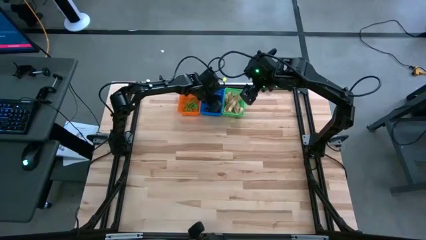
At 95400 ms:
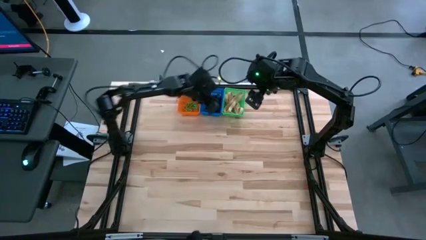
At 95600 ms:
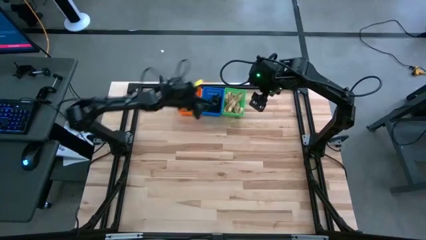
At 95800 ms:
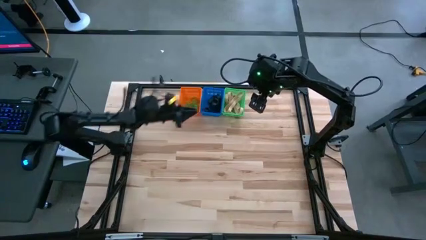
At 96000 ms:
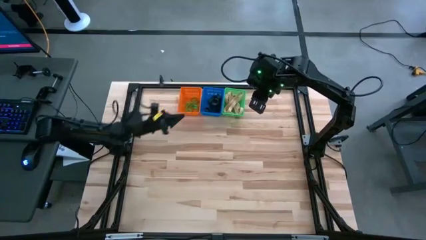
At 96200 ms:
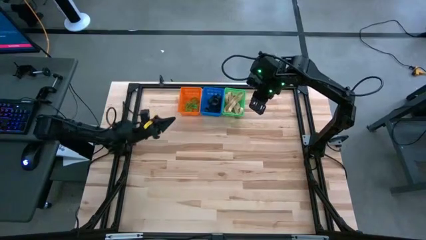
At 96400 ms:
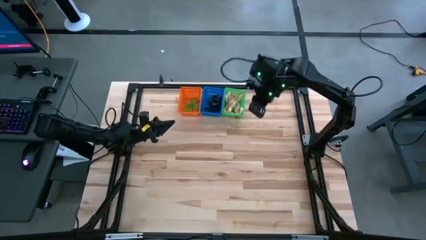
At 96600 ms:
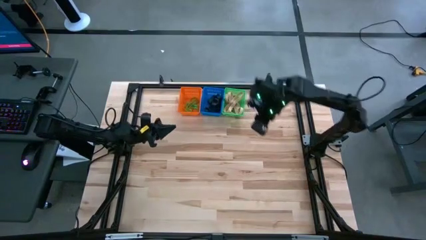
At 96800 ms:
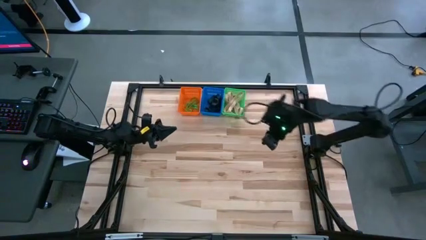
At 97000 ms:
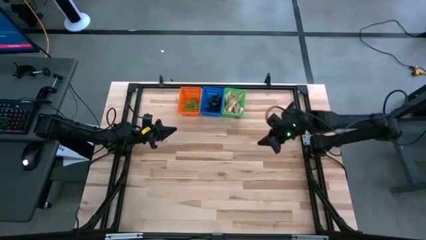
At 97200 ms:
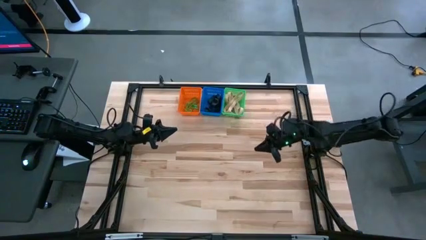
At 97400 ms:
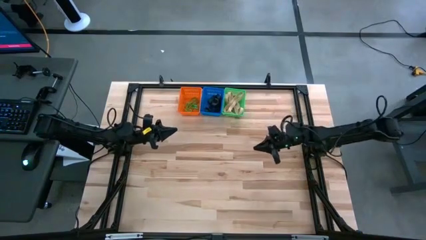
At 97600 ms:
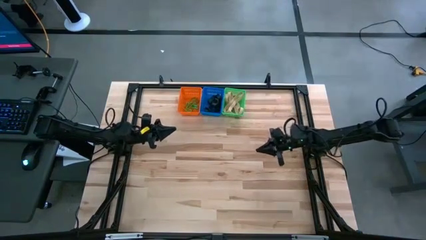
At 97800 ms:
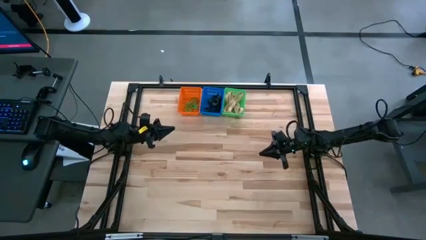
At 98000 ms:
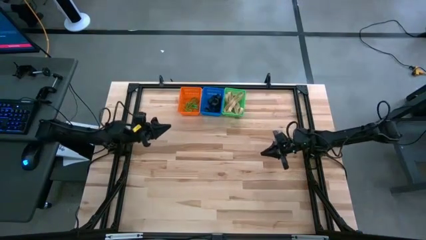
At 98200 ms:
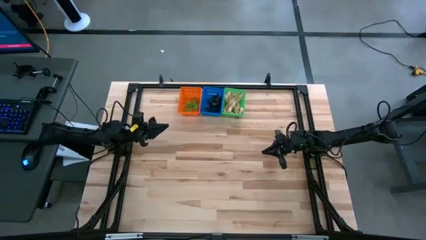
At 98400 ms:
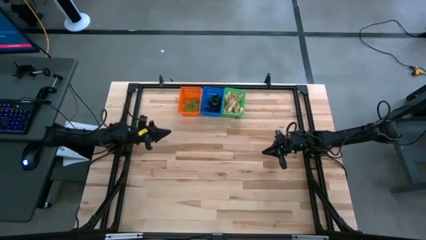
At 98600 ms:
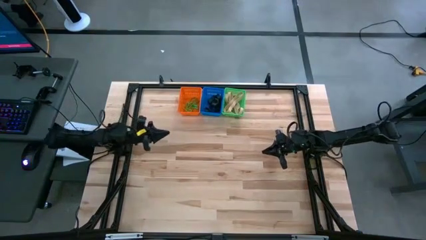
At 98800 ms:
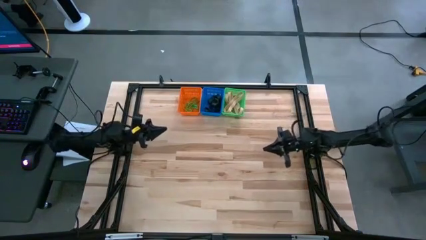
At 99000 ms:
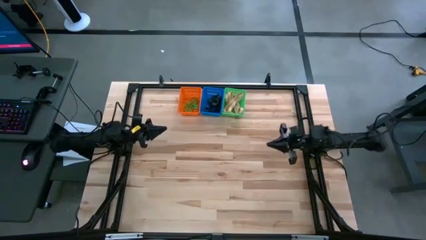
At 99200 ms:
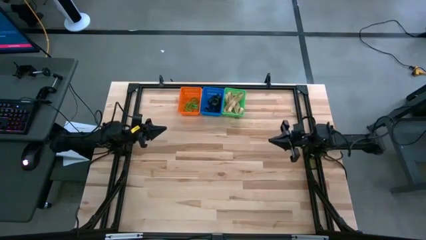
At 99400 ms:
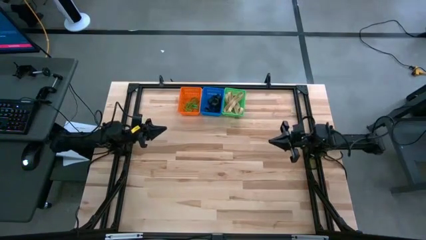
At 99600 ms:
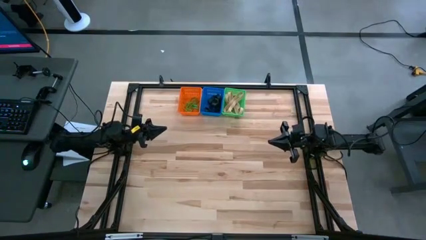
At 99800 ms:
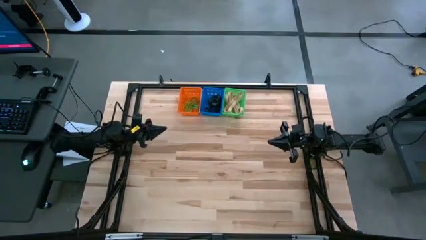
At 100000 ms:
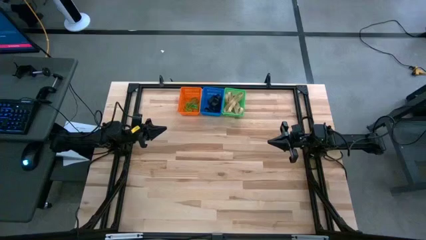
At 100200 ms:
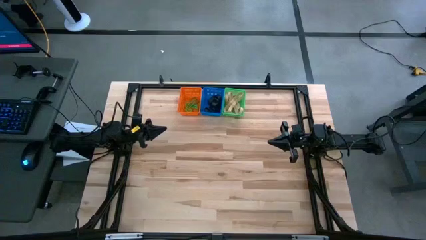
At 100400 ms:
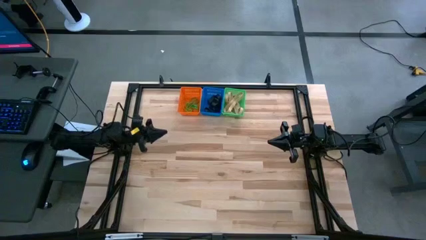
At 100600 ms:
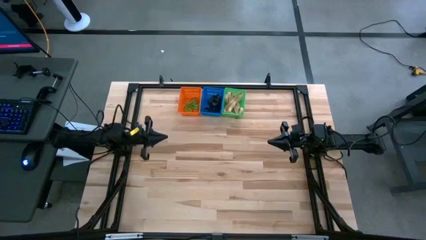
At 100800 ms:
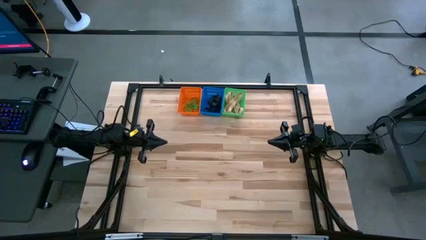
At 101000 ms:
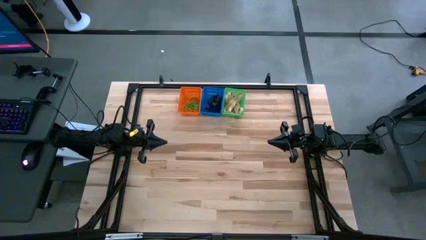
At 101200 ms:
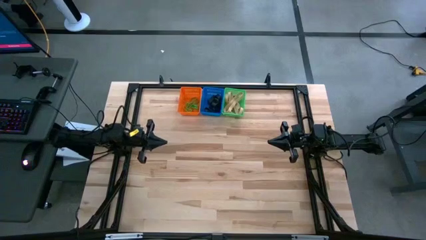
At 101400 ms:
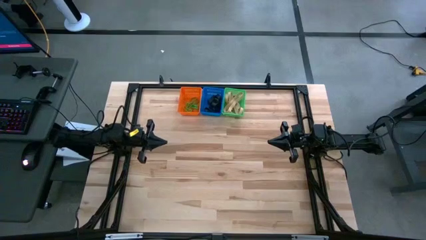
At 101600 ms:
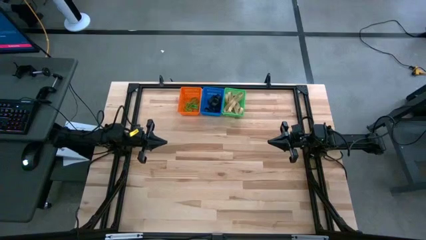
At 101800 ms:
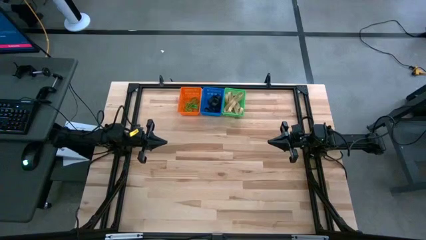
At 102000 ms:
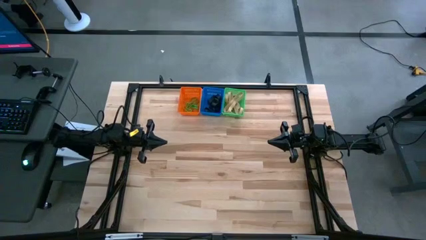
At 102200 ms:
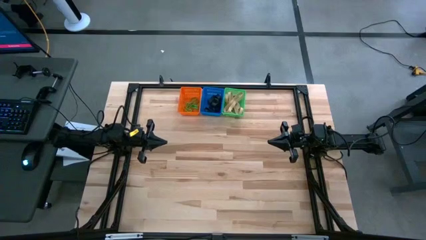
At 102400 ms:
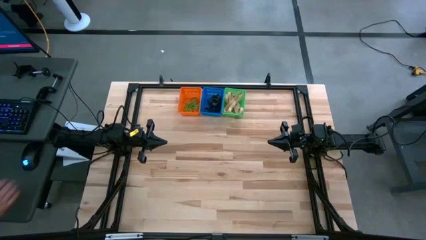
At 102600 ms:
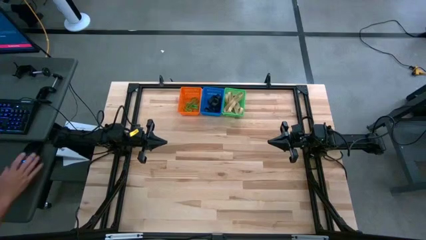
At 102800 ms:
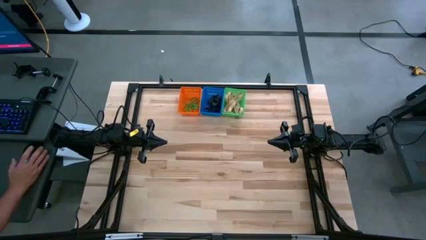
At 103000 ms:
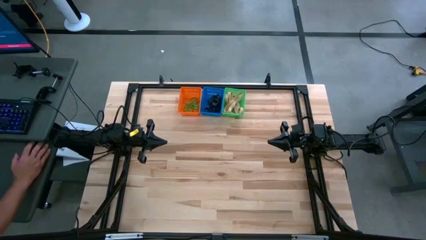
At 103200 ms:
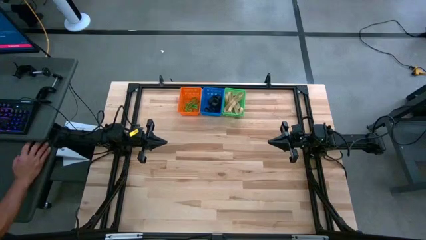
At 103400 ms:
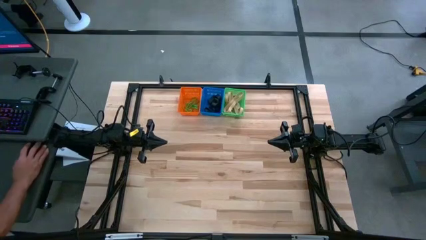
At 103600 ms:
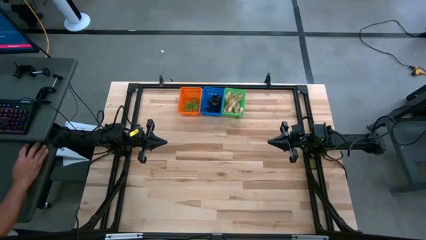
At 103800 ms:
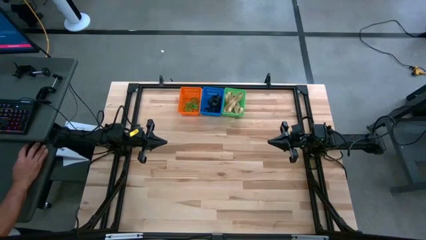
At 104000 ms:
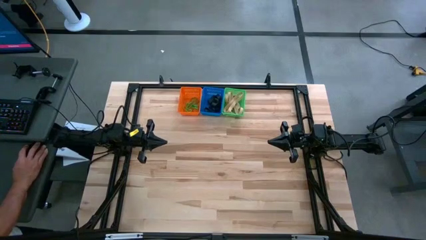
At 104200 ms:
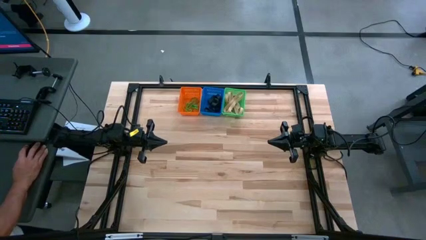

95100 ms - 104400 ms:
Task: Sort rubber bands into baskets
Return to Home Position

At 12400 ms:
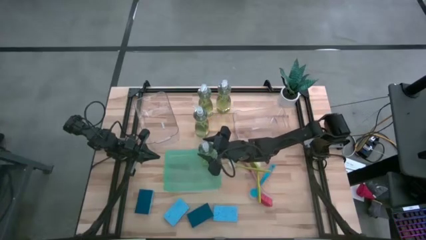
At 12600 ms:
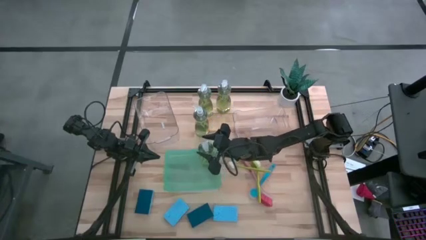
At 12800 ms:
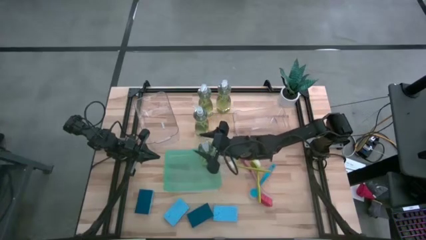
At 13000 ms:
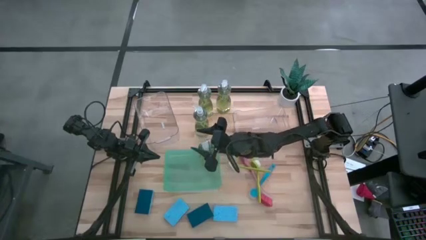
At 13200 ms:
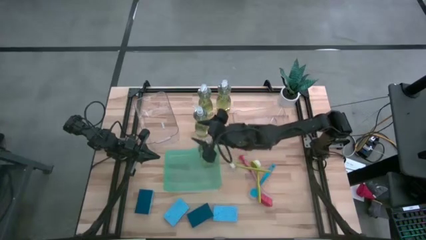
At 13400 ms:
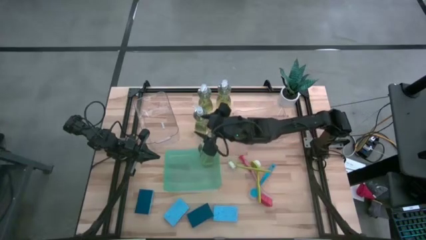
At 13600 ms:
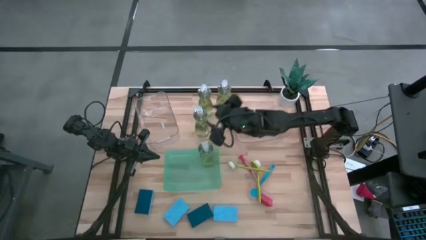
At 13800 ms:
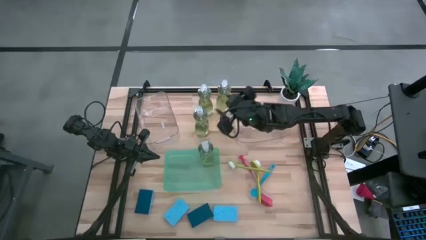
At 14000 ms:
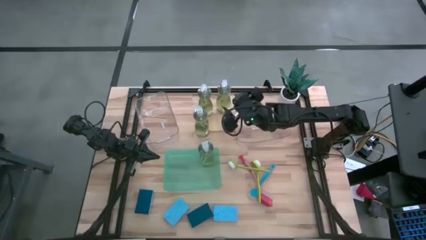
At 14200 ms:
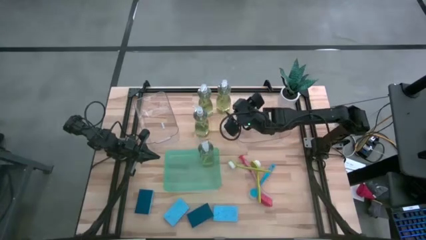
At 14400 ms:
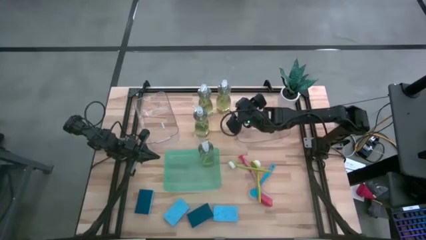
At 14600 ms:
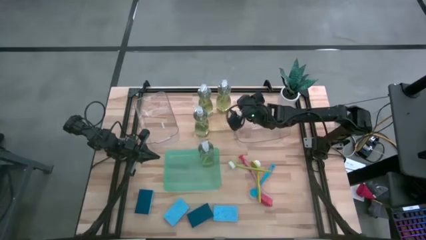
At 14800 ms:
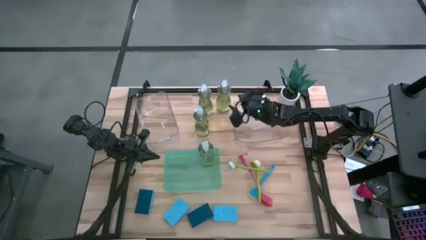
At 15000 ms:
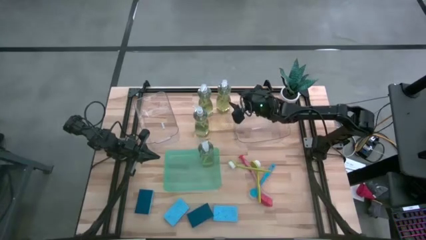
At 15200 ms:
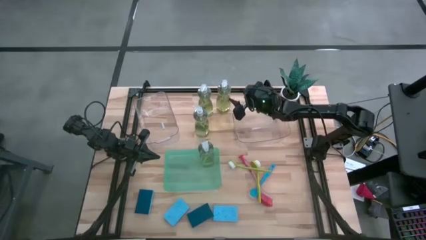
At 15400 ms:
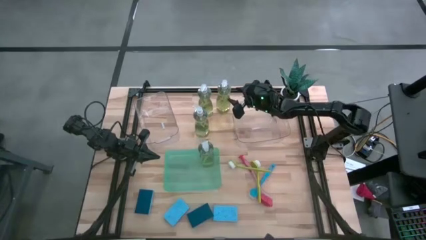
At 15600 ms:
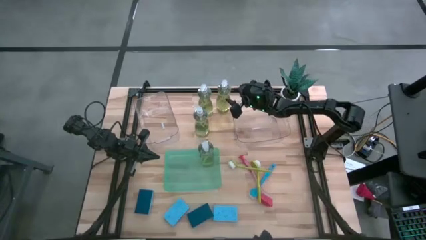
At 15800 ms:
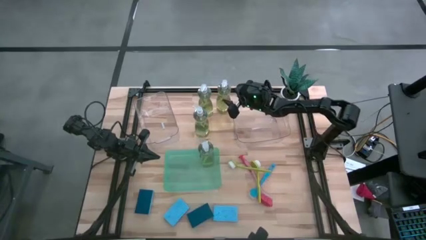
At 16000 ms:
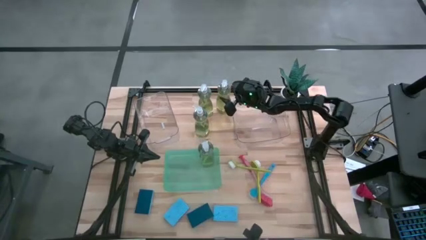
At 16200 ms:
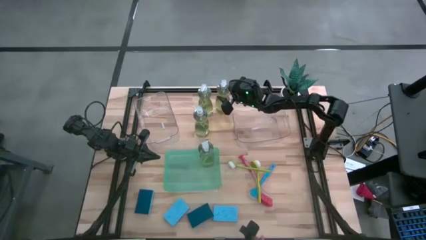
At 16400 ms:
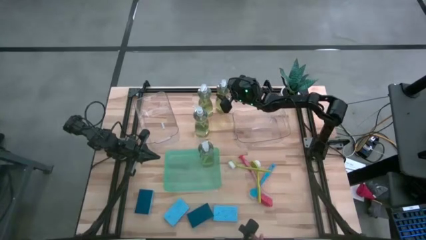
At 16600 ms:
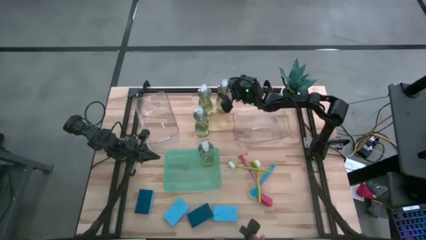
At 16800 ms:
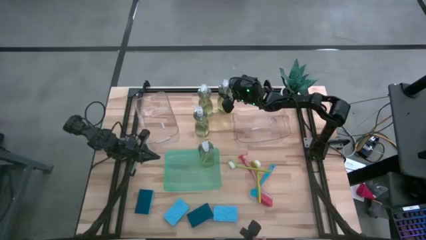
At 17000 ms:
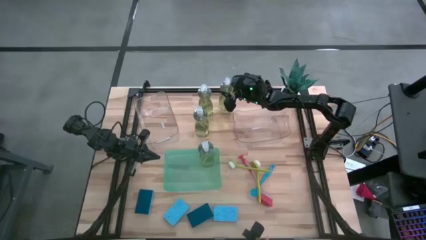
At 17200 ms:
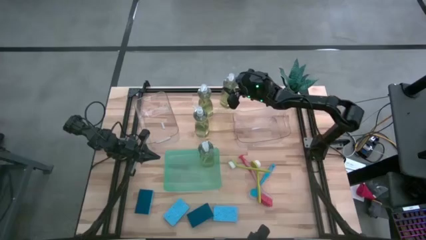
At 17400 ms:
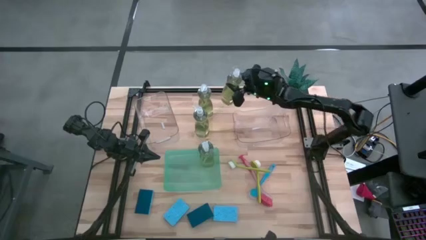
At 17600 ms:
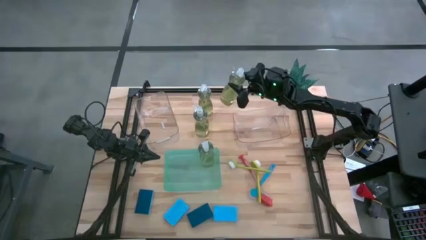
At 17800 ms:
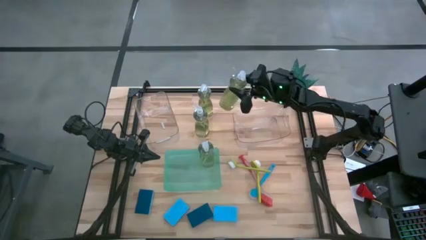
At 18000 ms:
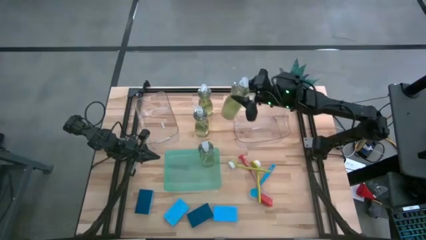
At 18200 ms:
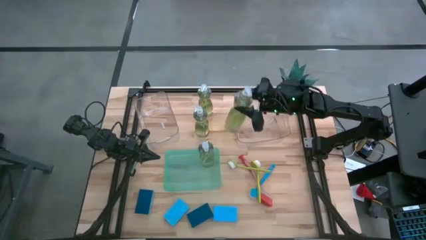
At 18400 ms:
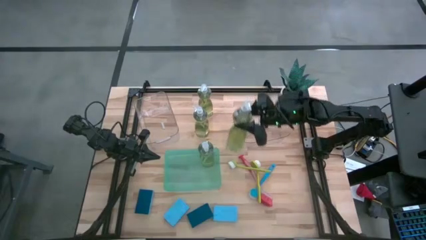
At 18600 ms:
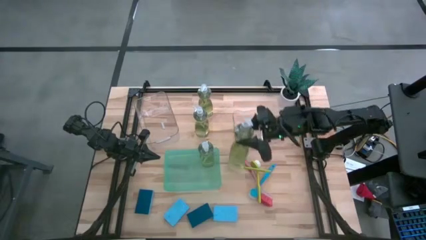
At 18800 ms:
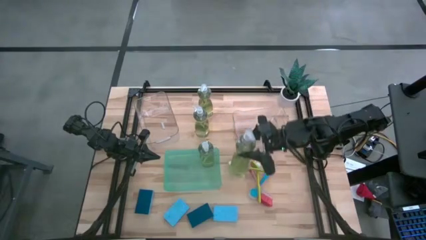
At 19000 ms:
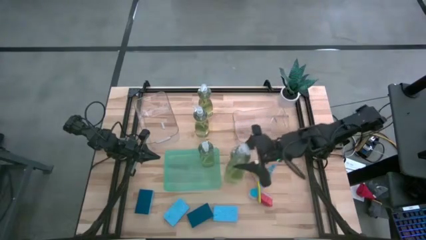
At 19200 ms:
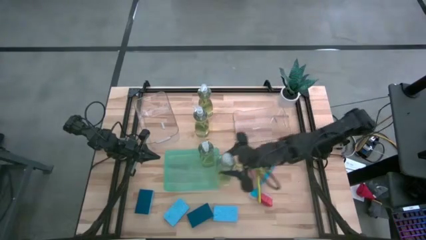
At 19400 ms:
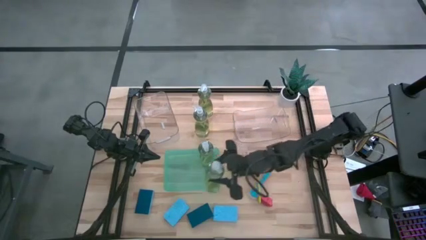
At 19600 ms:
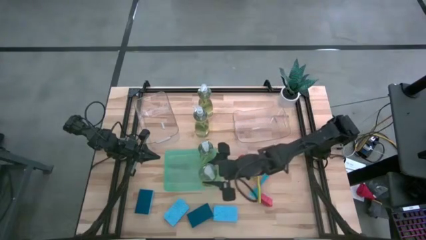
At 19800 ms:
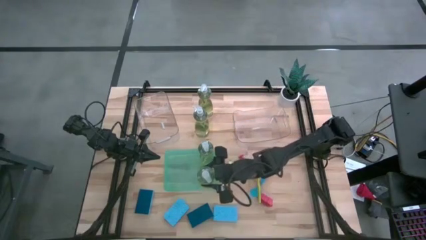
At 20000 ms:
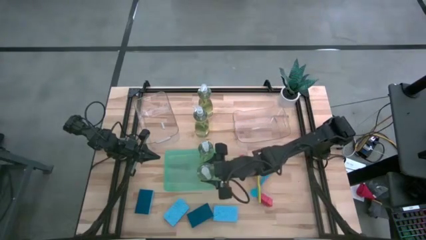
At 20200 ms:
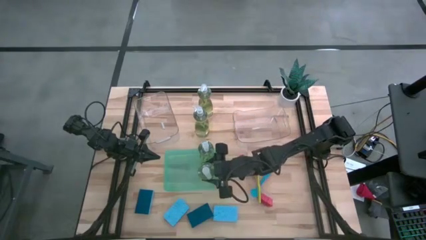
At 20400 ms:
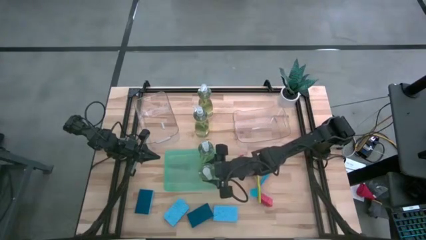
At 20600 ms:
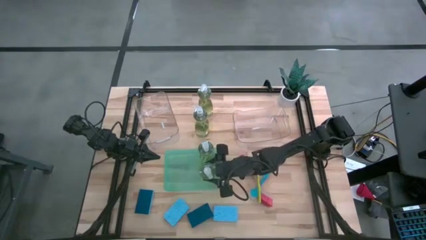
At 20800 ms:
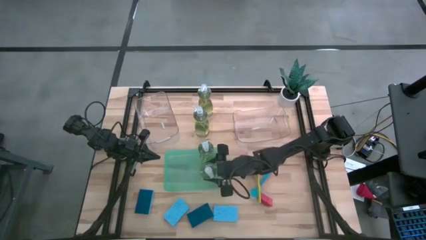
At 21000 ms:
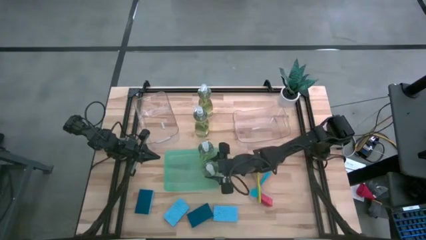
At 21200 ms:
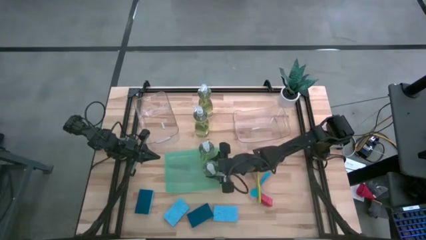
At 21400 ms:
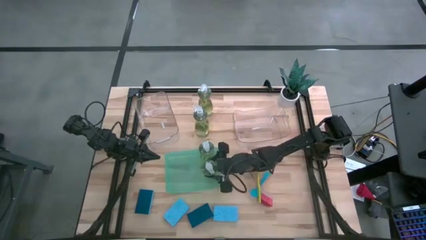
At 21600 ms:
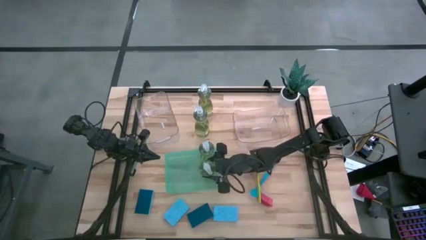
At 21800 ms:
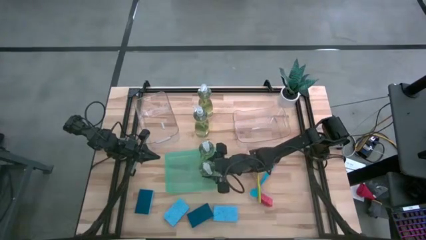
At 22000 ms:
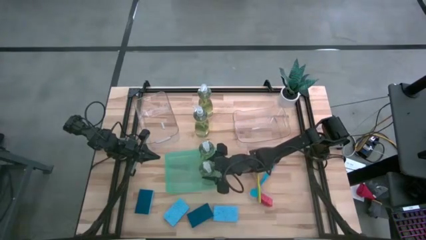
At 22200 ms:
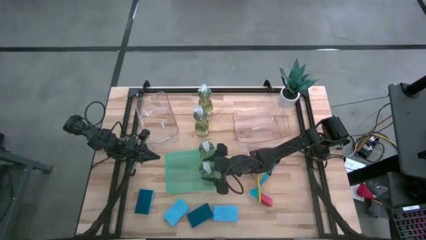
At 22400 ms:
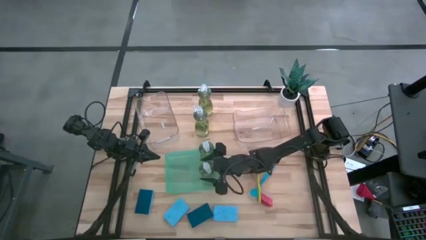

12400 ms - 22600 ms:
Task: Pick & Place Kitchen Sink Supplies
Put the green soap dispenser into the green bin
